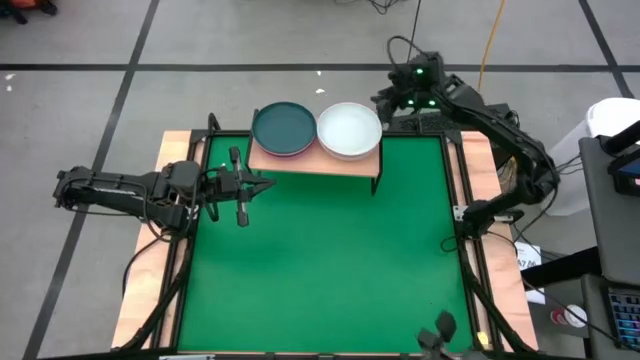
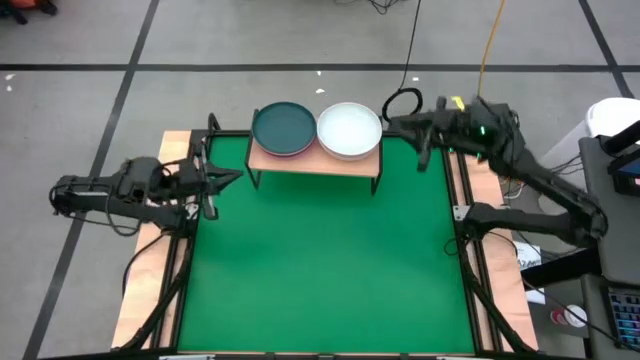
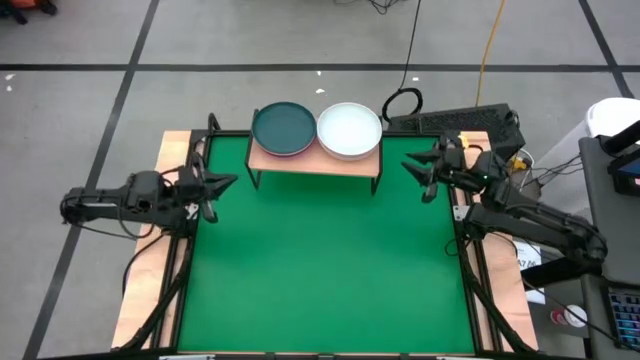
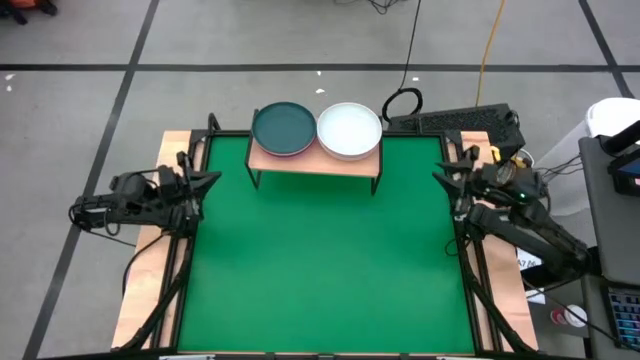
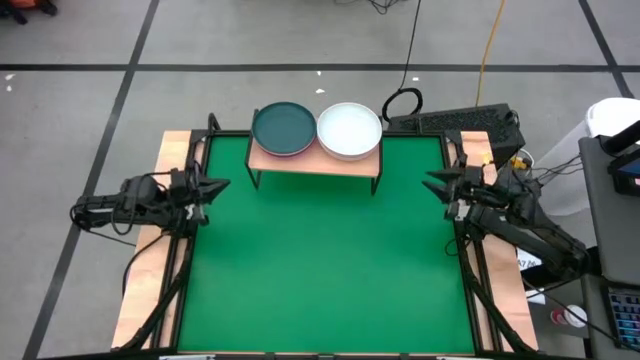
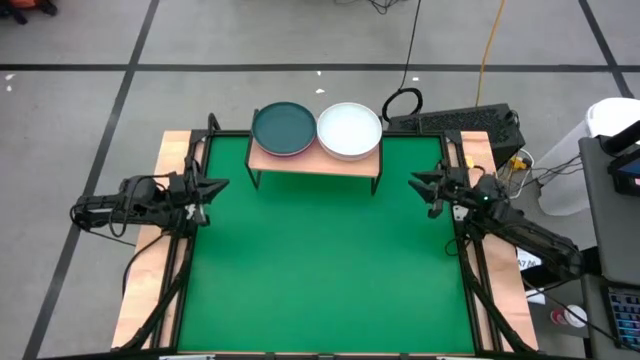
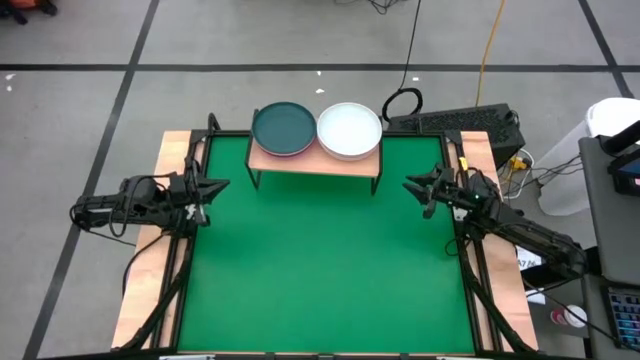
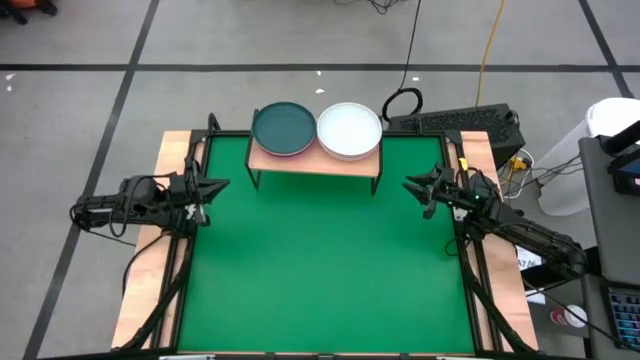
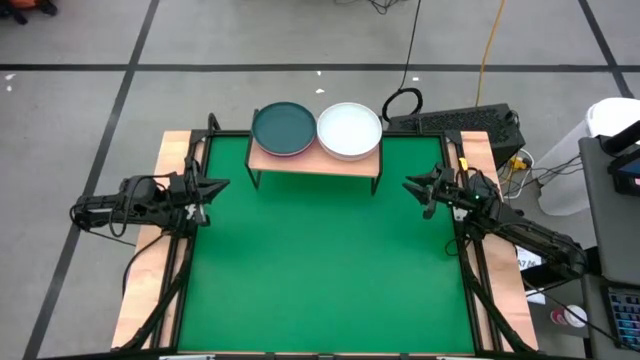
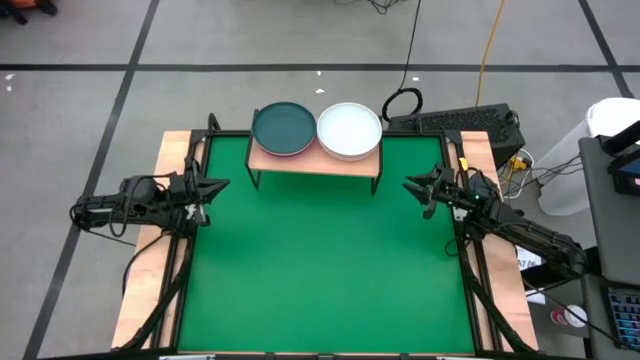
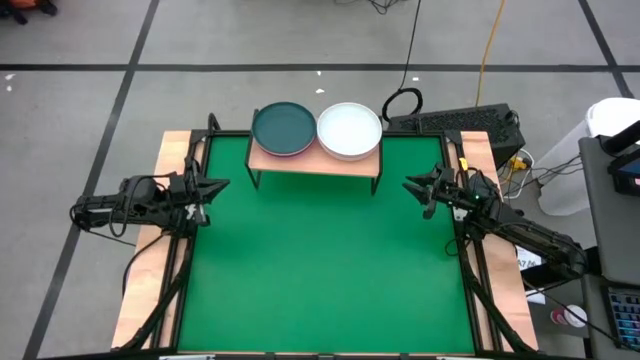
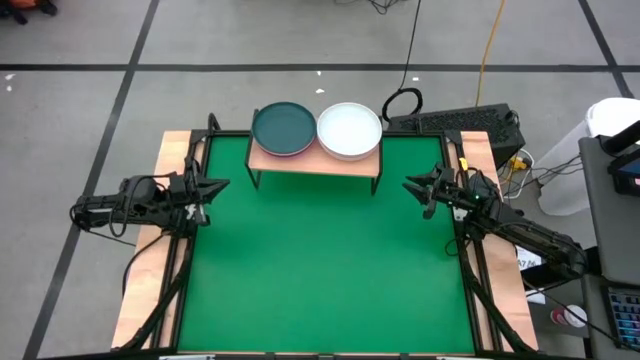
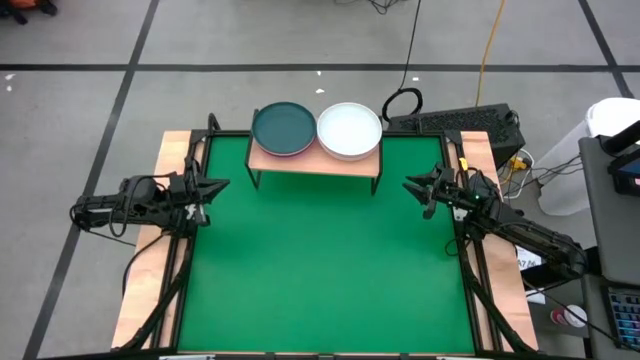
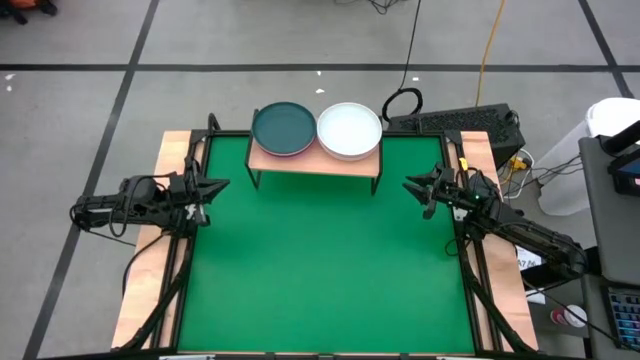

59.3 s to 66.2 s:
Task: Place and stack plates onto a shelf
Return to Home Position

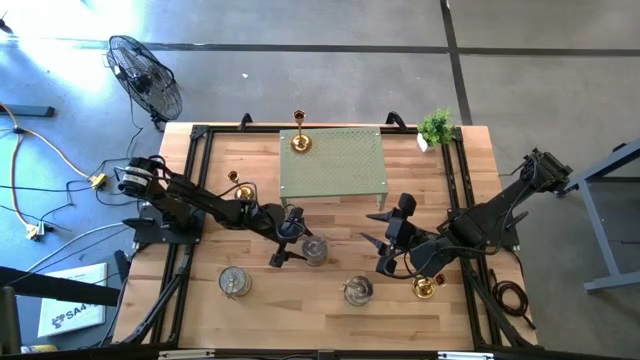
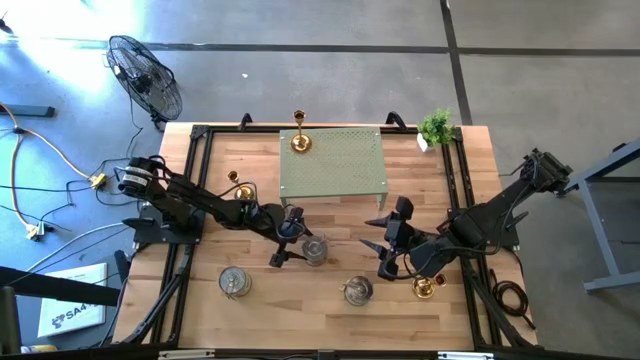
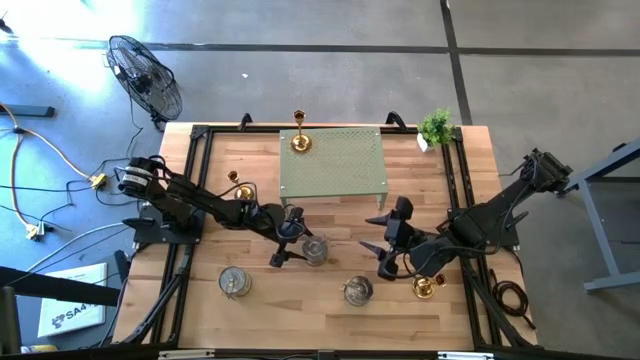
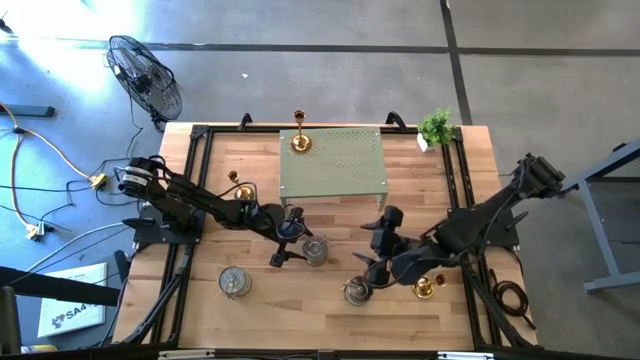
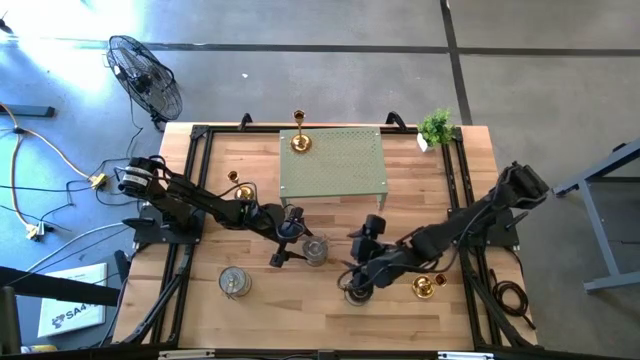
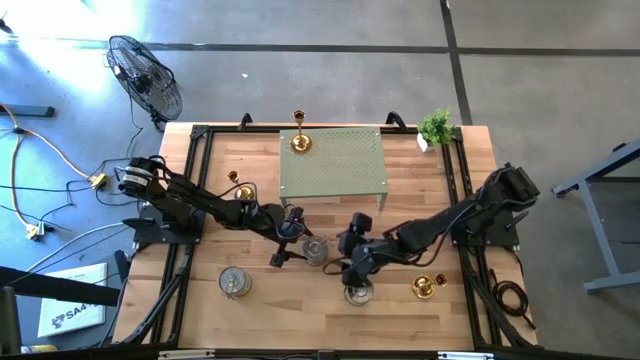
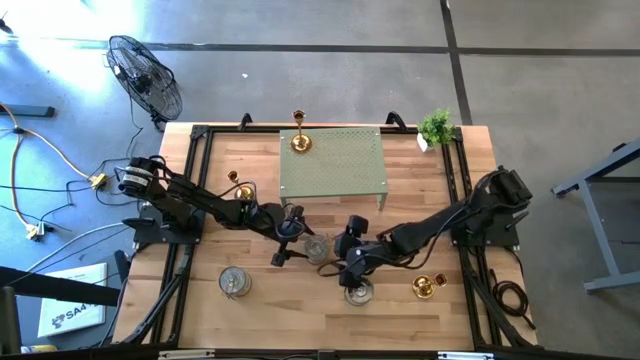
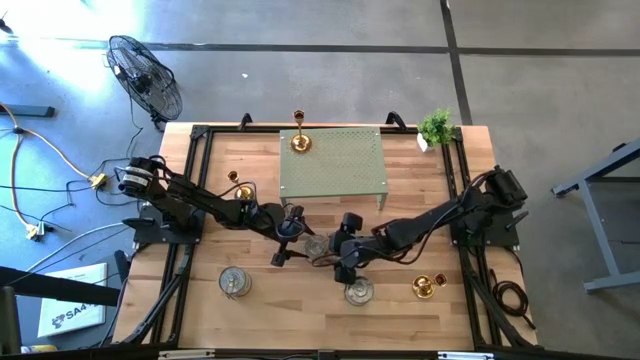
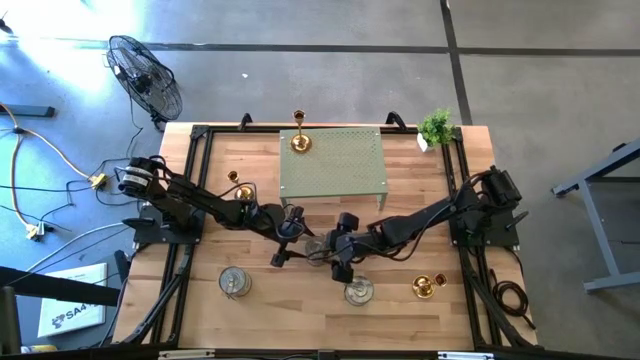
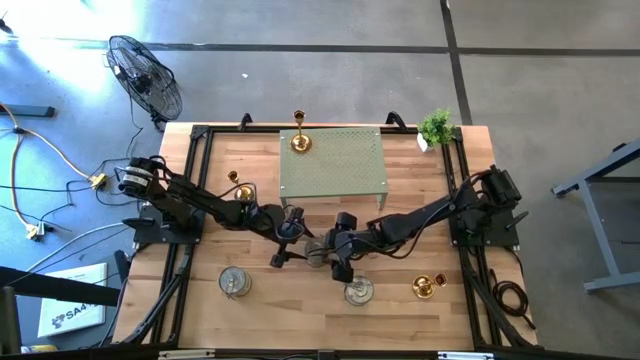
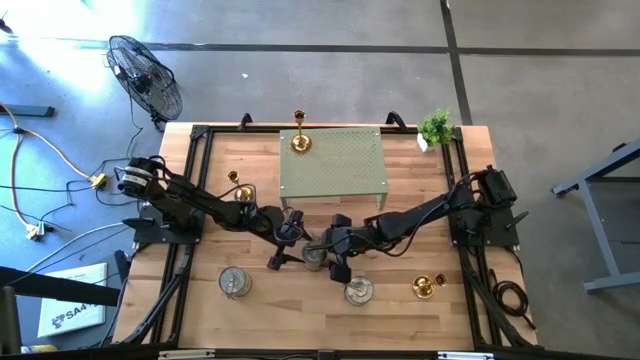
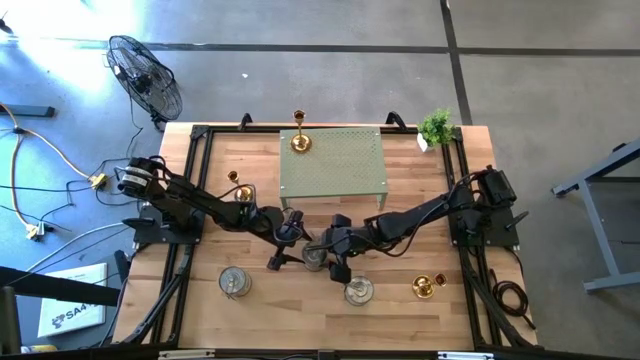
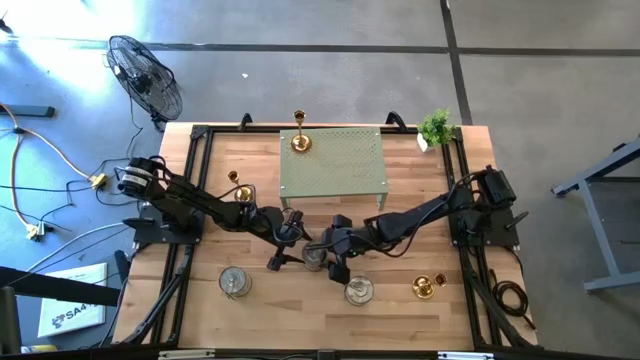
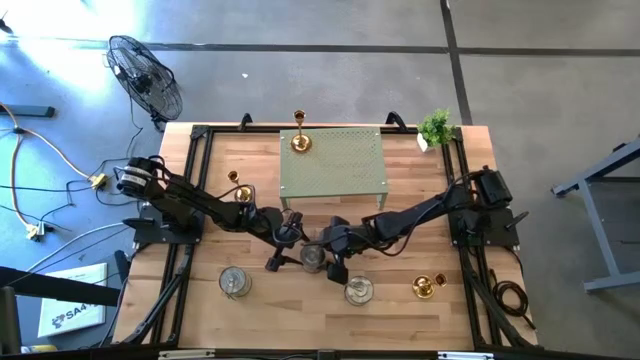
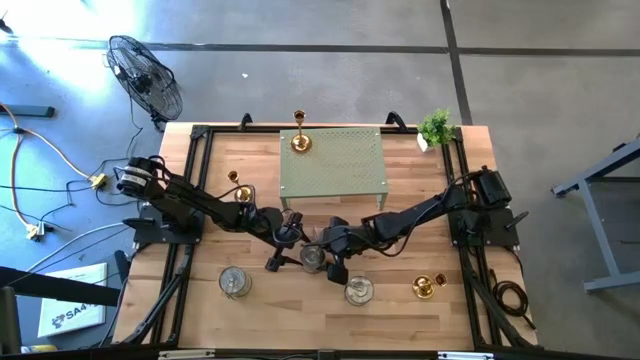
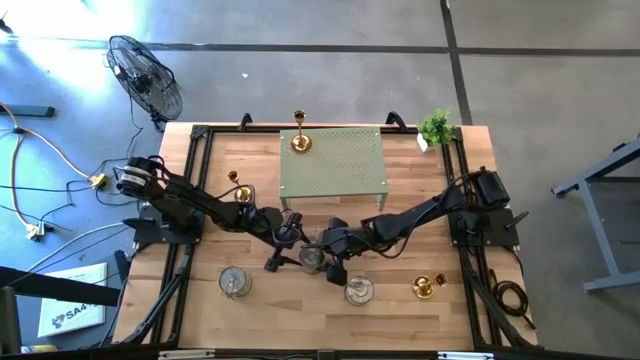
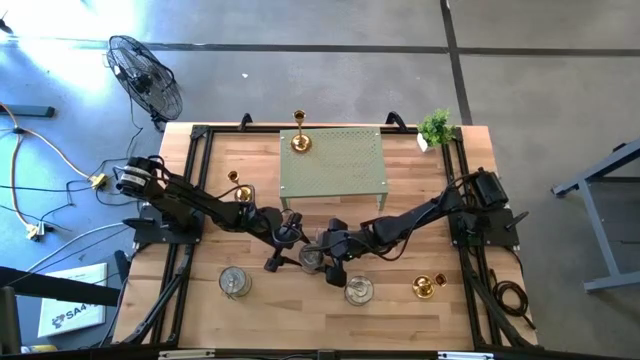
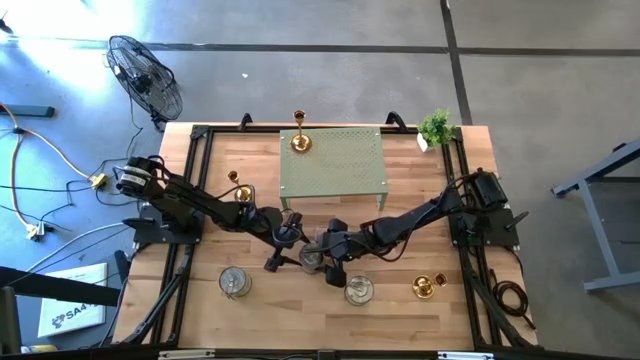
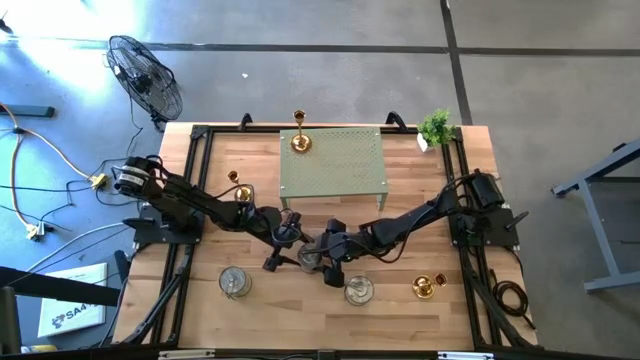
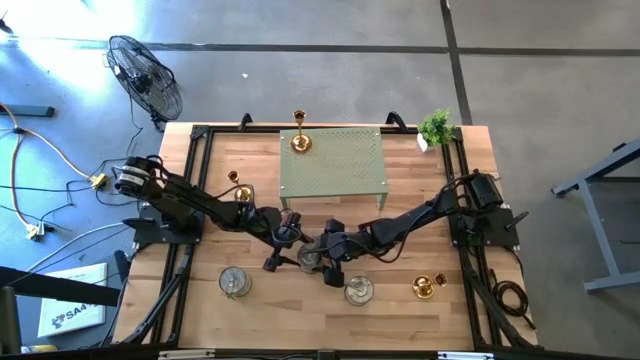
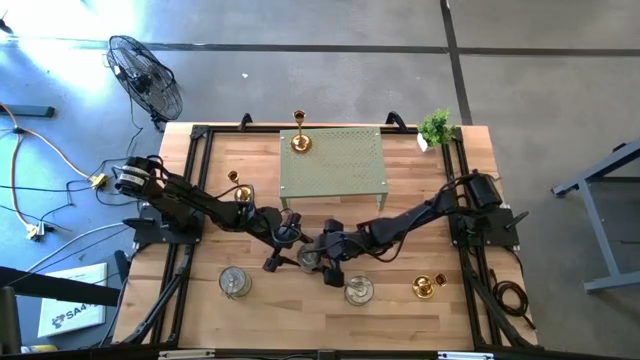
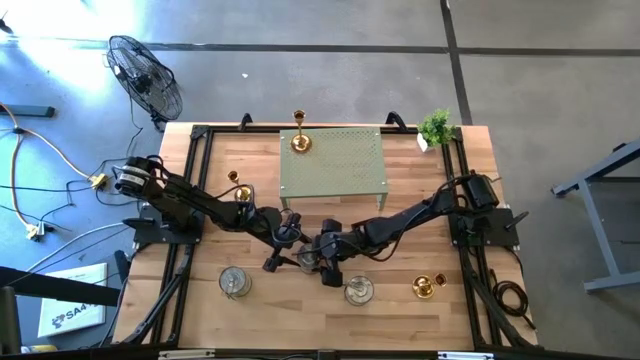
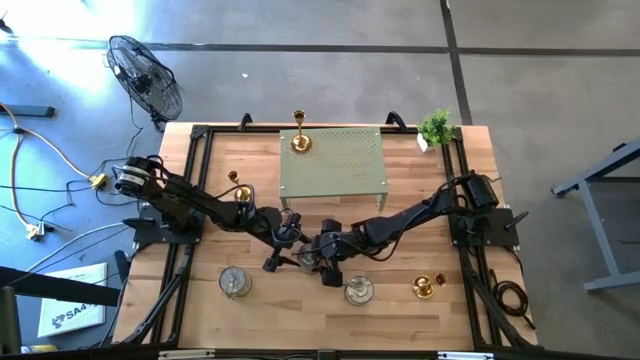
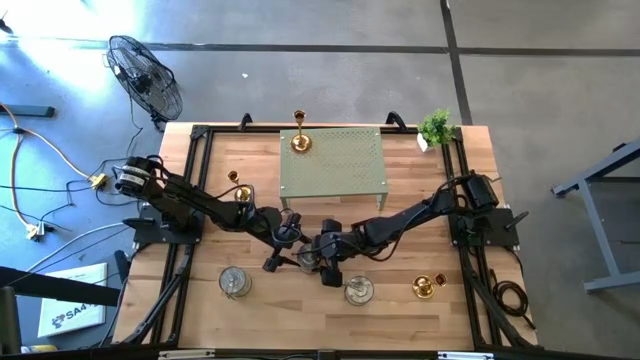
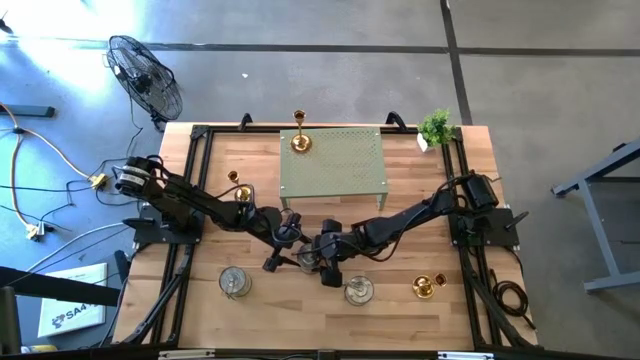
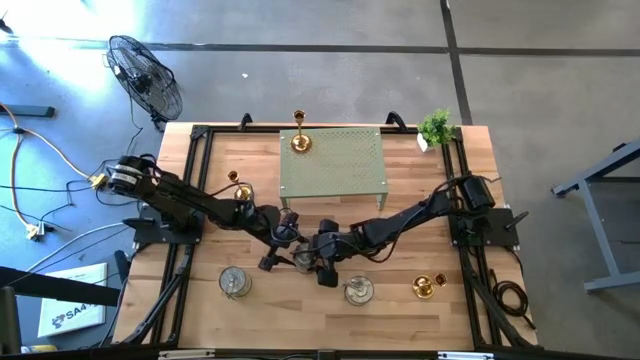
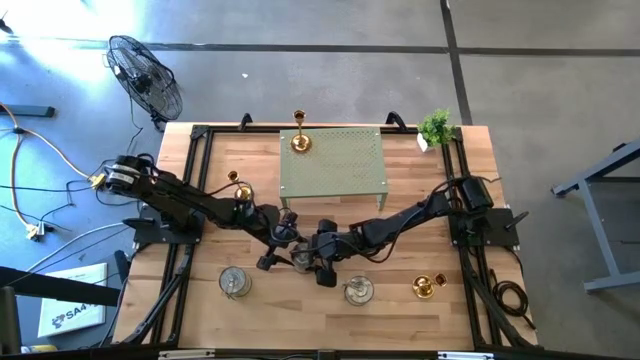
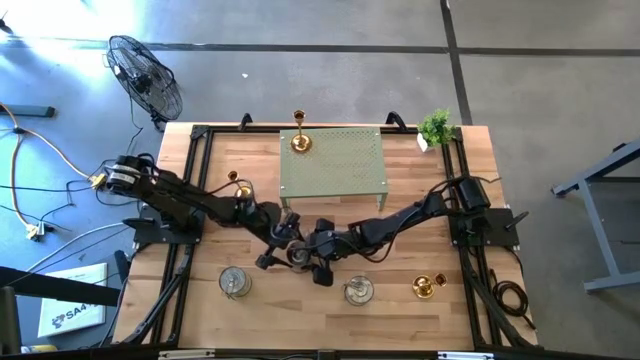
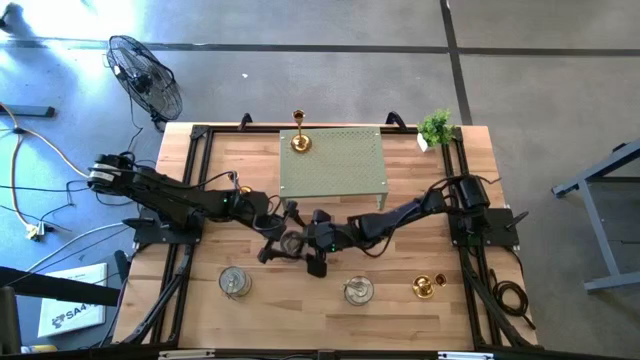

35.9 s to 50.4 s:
Task: Pick & Place candle stick holders
Put the top silver scented candle on the shelf
